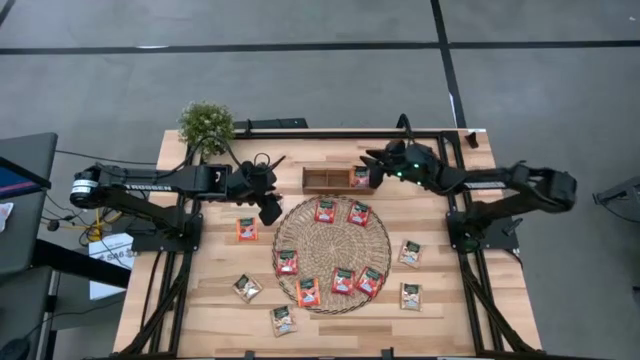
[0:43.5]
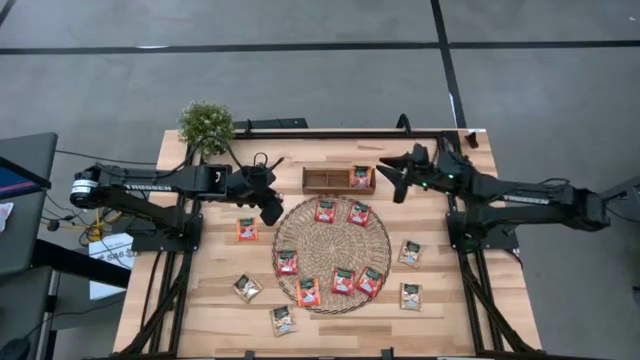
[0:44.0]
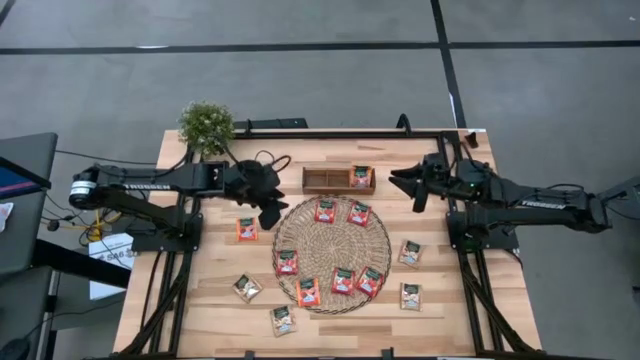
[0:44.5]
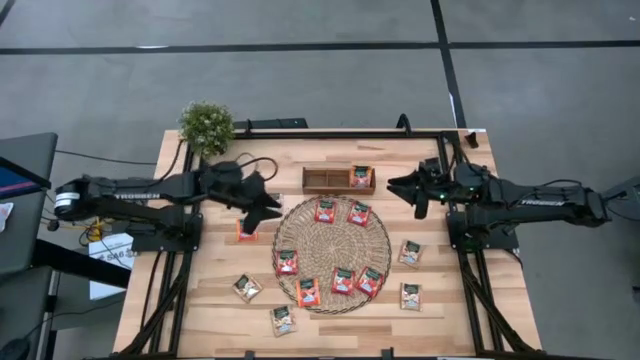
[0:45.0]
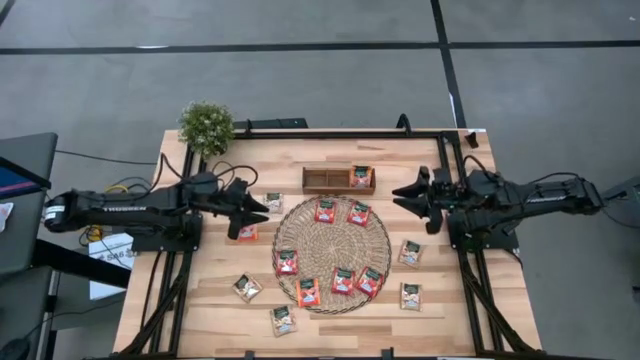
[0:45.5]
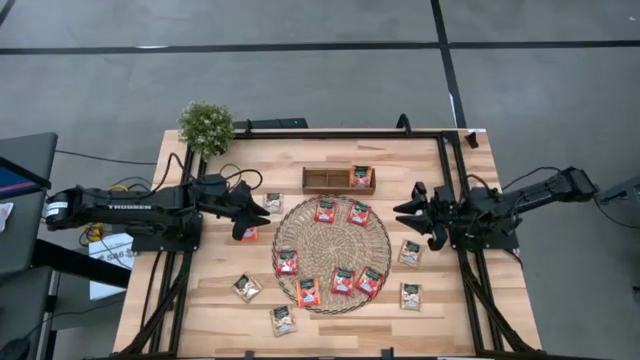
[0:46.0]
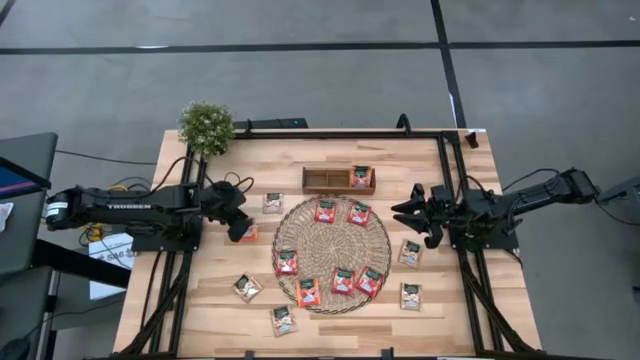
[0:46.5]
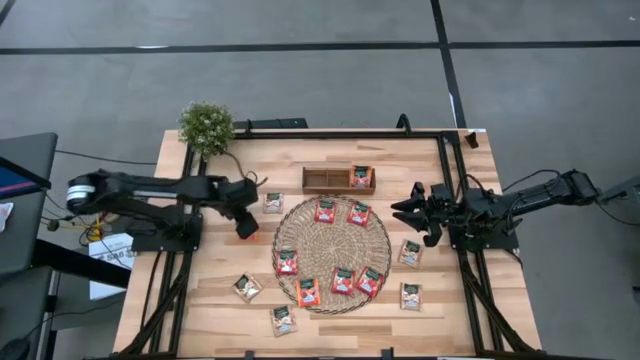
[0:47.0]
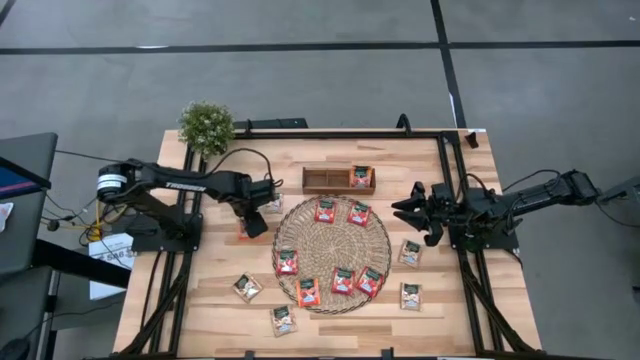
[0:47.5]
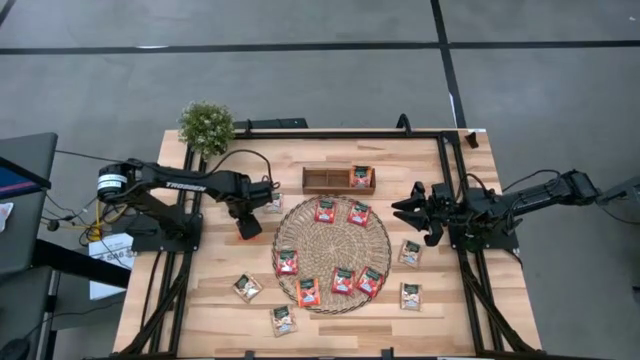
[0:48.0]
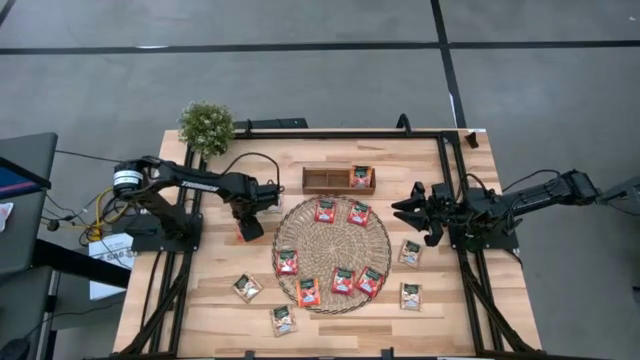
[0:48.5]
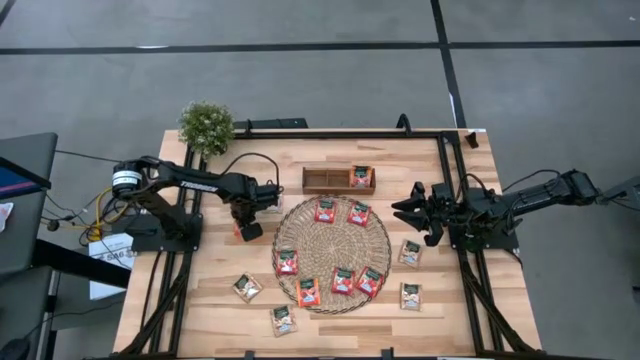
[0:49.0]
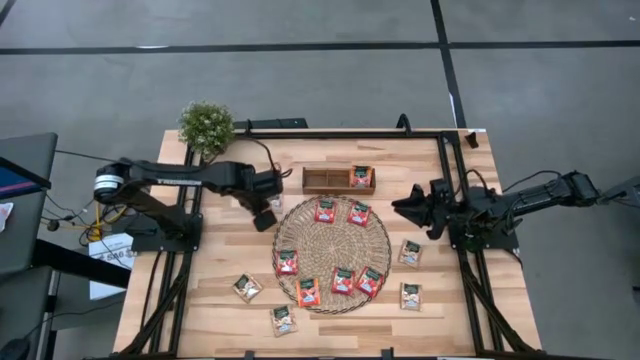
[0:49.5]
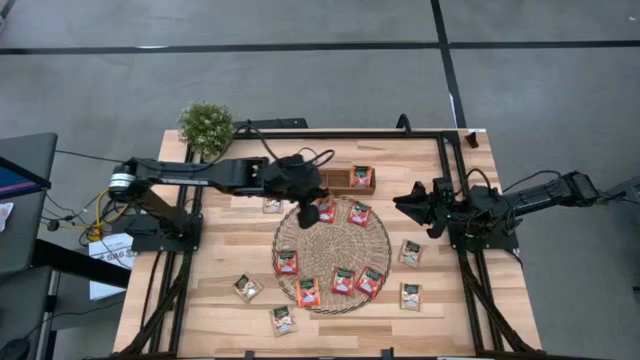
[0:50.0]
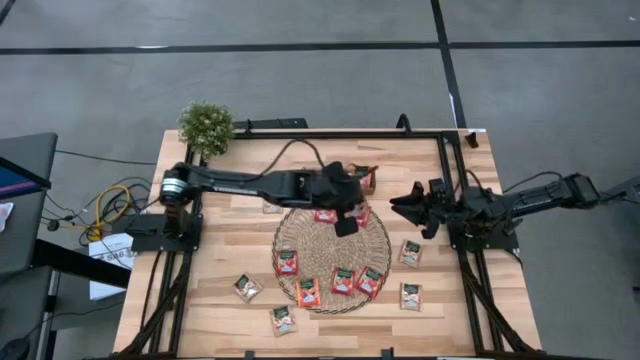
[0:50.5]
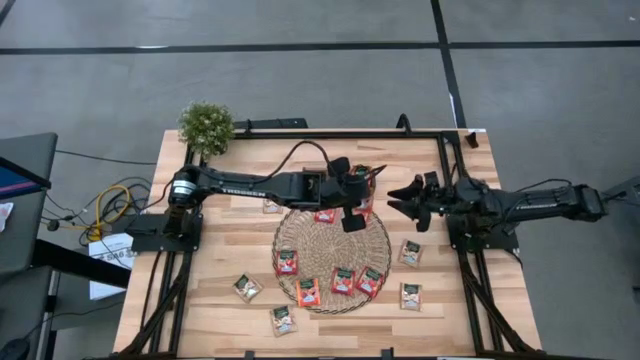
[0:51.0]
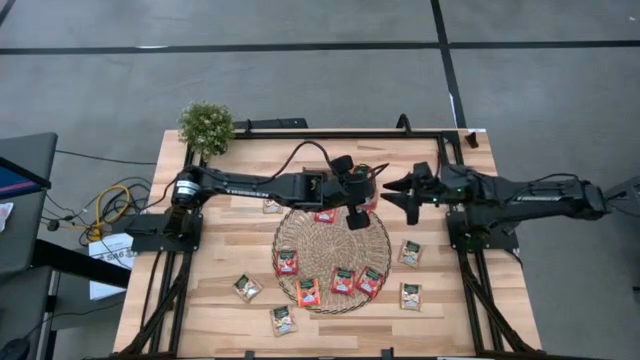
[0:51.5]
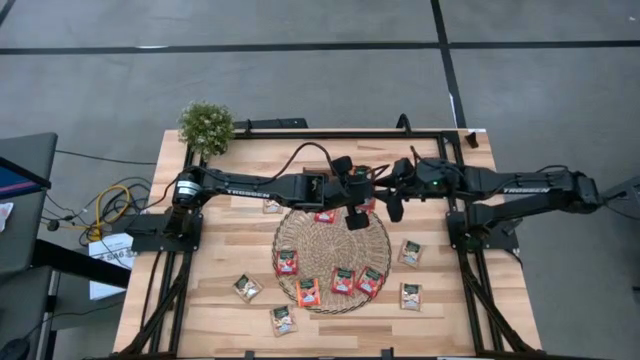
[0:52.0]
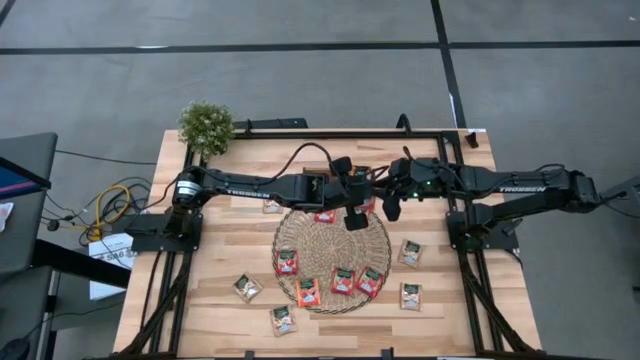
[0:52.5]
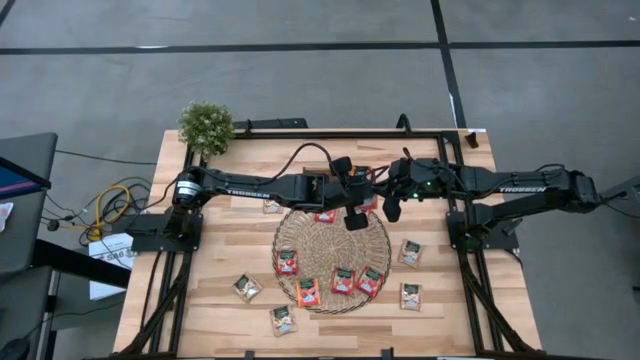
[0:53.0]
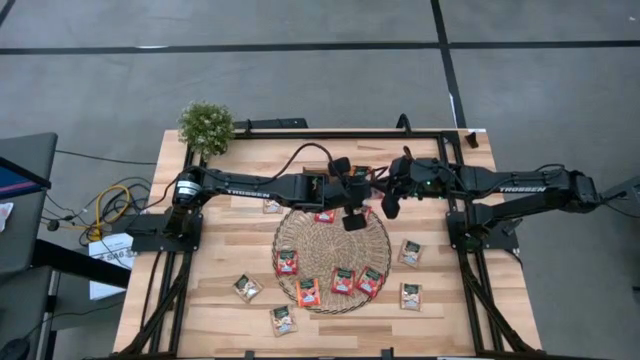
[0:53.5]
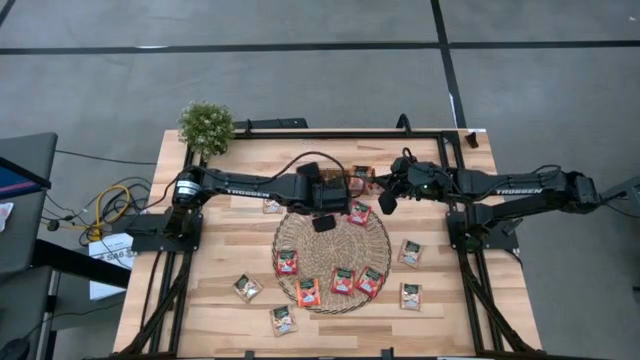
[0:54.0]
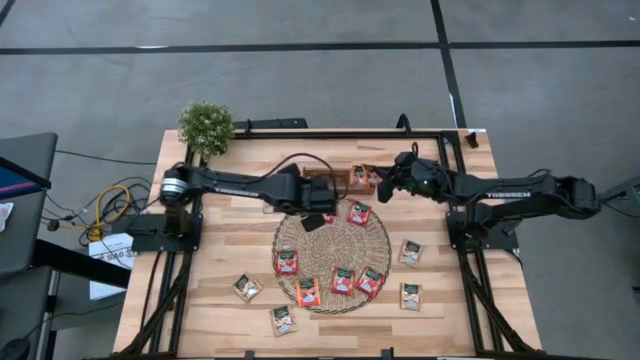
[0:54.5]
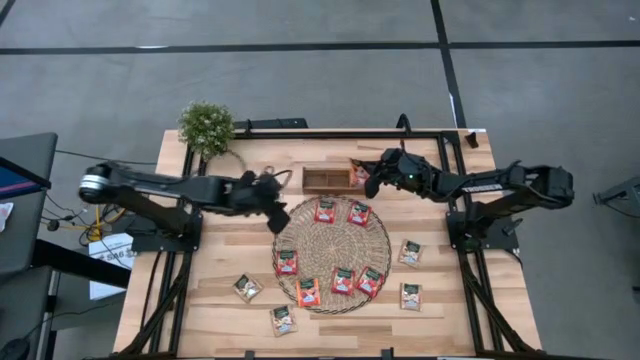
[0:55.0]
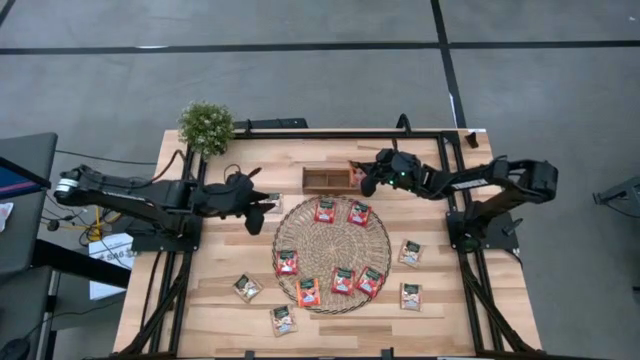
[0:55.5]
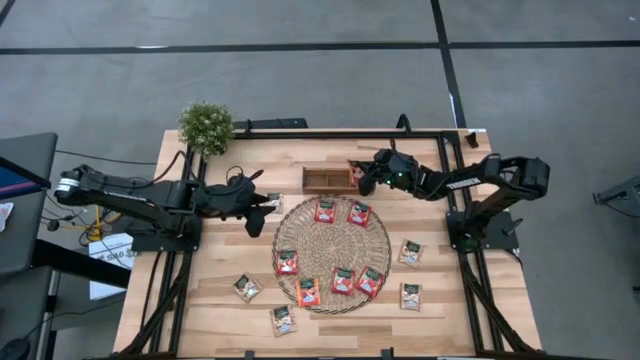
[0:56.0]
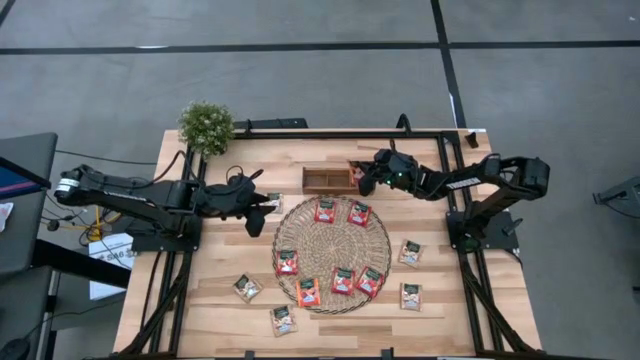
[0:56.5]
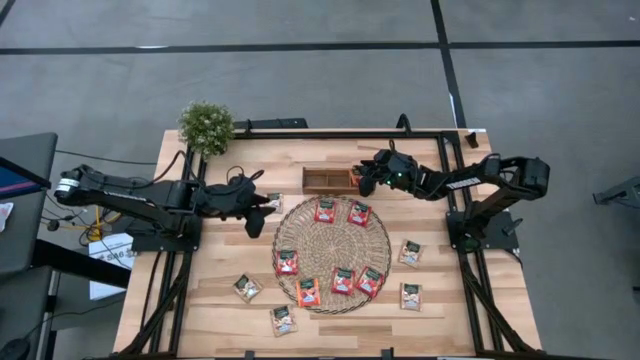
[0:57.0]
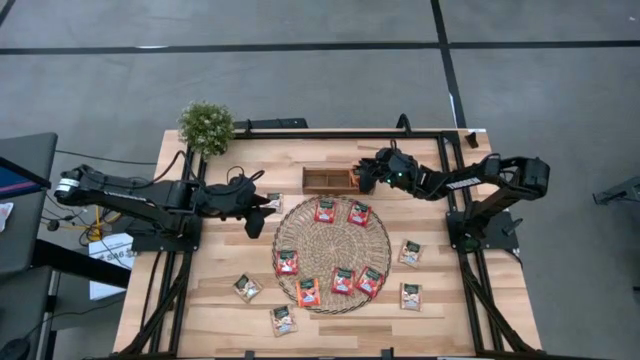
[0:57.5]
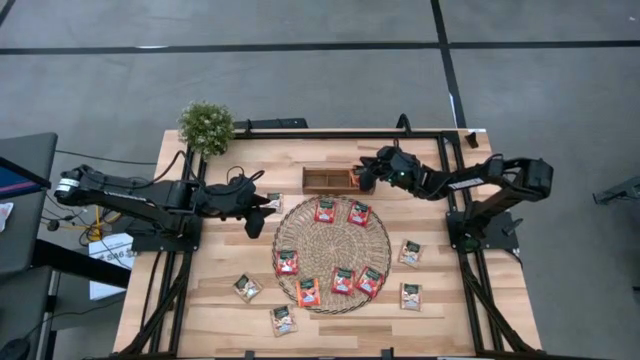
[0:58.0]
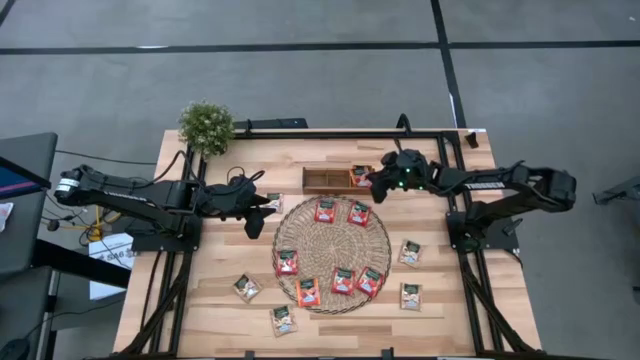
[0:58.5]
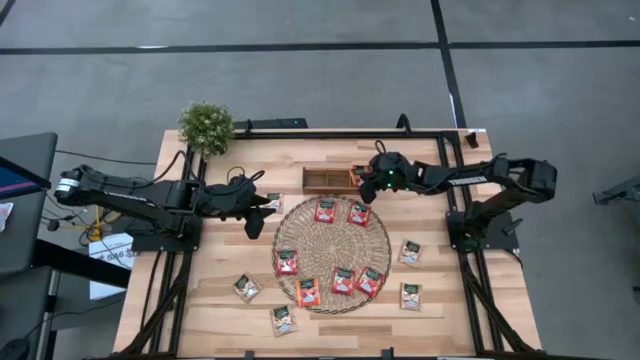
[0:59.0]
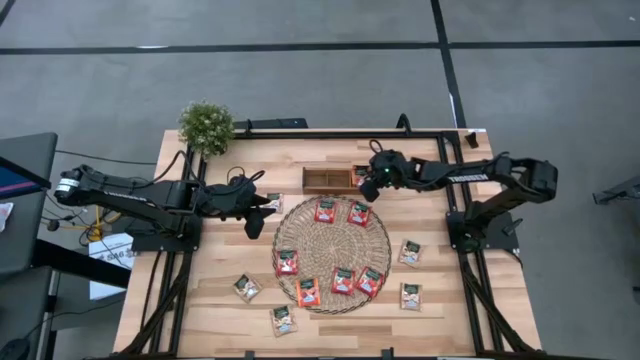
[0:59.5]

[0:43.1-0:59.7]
Task: Pick & Place Tea
Put the orange tea bag into the right section of the wooden organizer

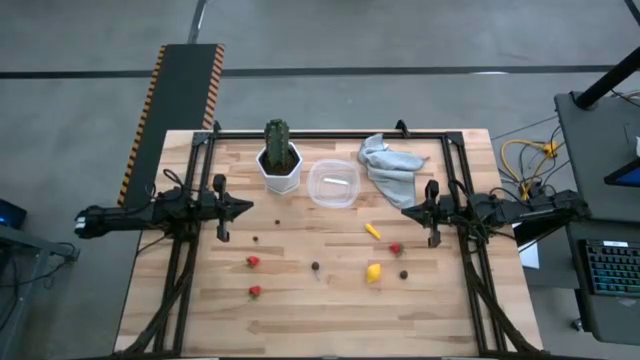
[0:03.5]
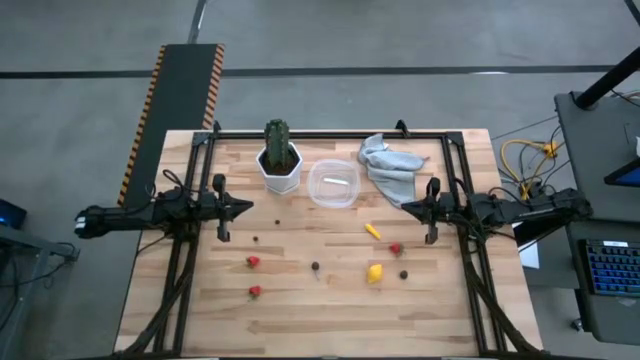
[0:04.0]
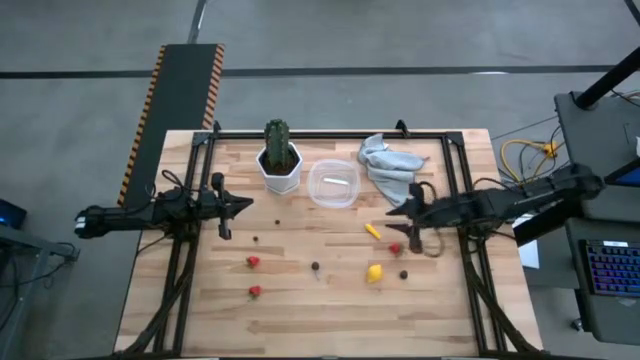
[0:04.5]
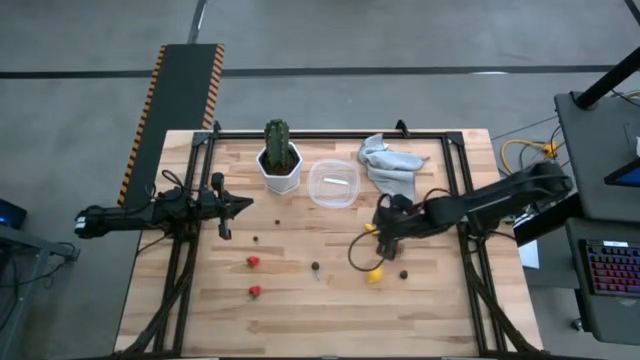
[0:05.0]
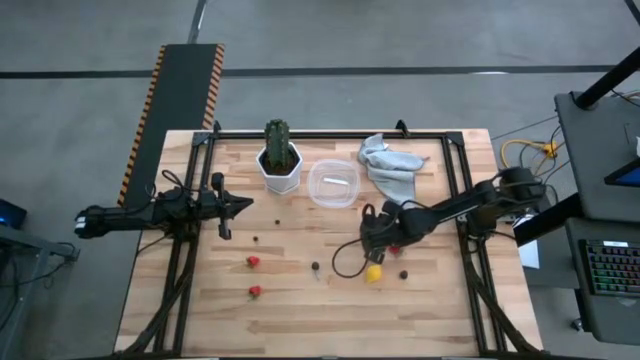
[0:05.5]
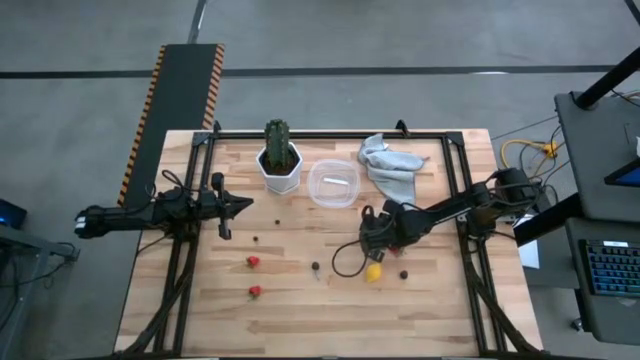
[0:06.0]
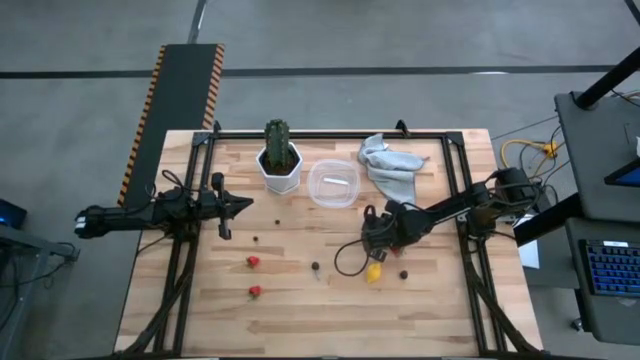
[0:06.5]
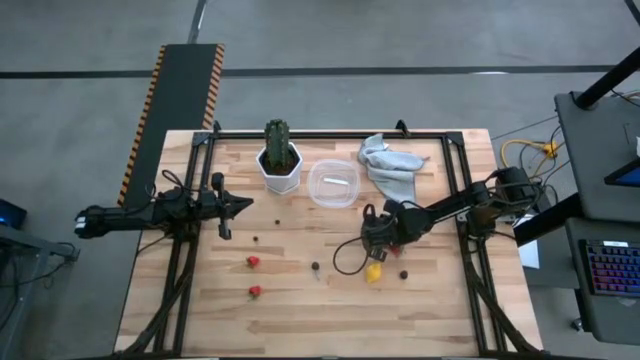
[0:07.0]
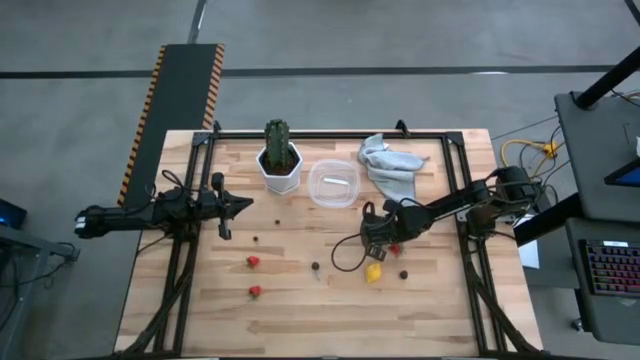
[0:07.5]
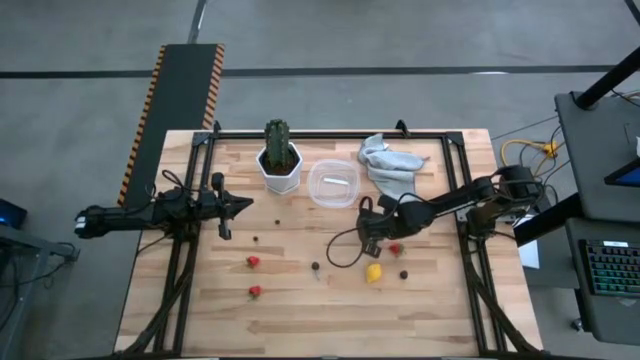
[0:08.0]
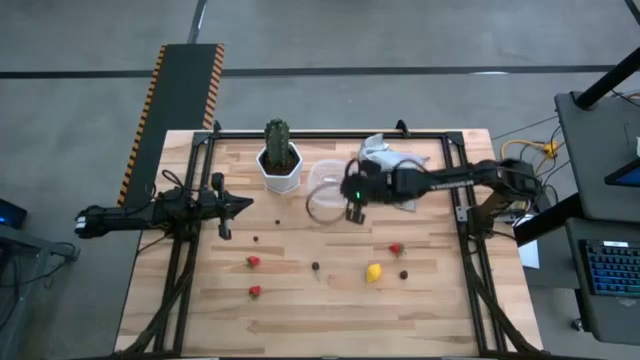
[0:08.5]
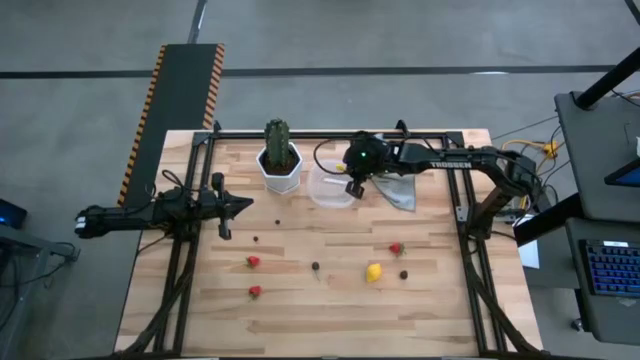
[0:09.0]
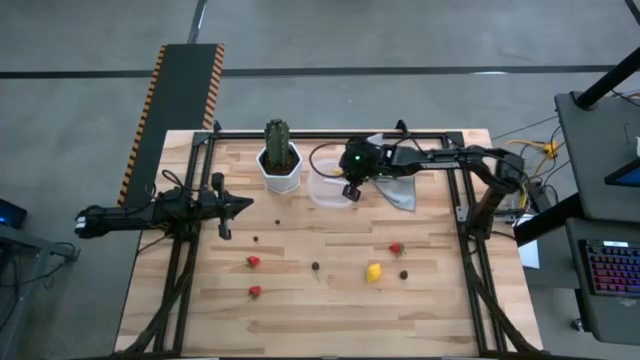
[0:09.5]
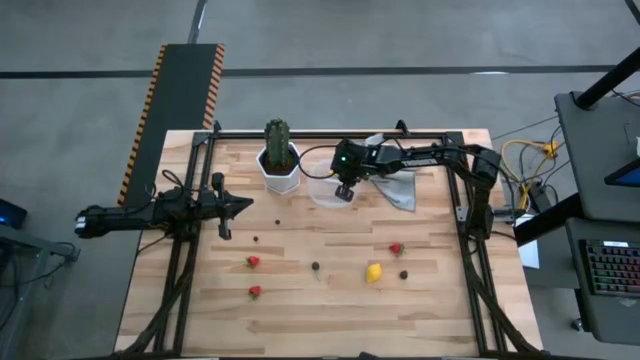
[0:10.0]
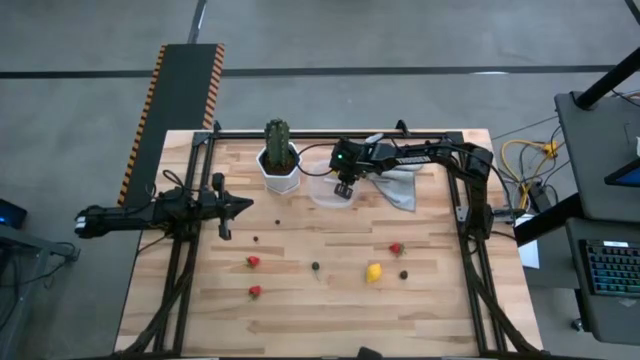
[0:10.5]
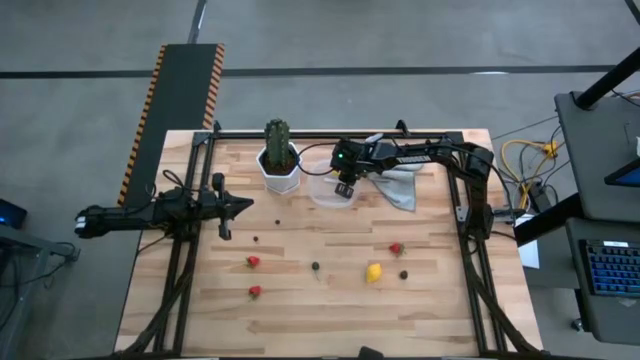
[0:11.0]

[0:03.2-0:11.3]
Task: Pick and placing Produce into tupperware
Put the small yellow corn into the transparent bin
